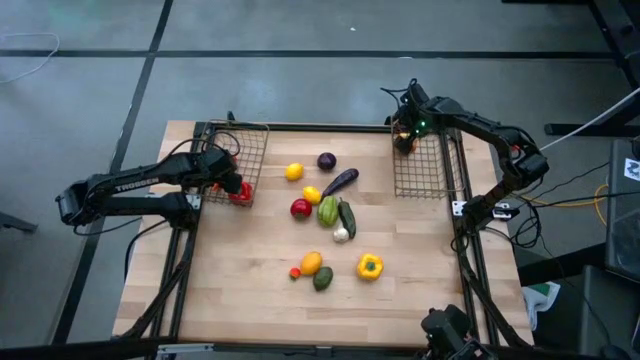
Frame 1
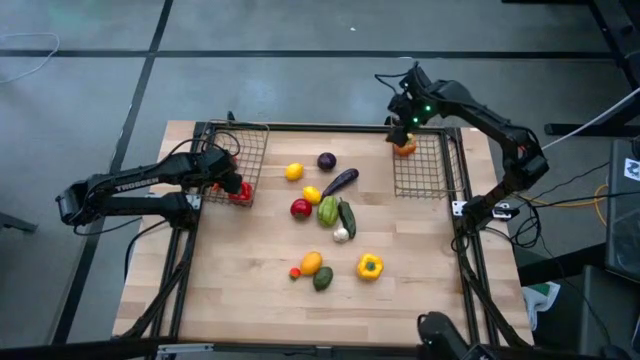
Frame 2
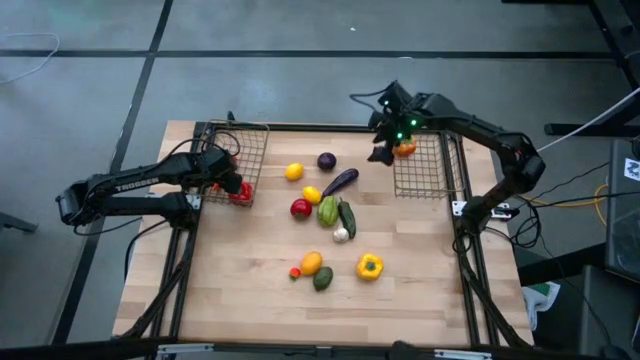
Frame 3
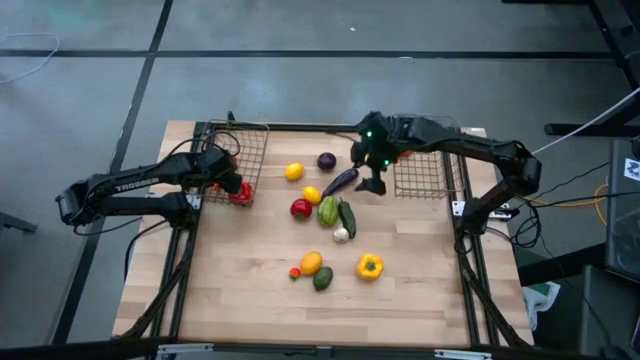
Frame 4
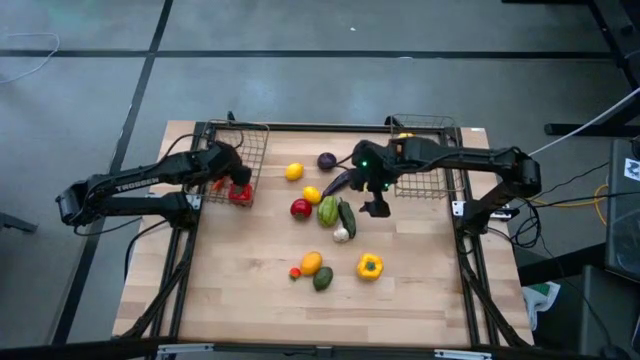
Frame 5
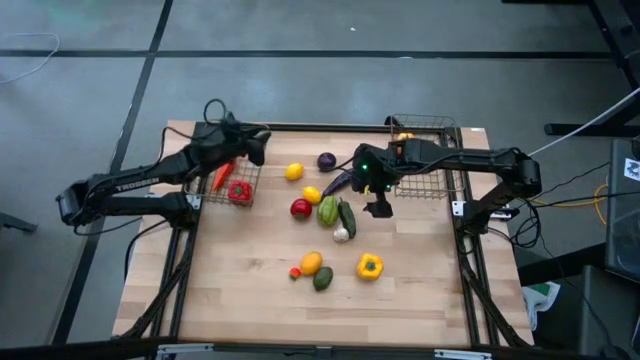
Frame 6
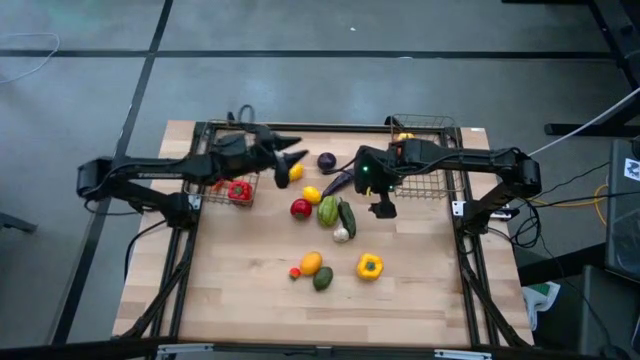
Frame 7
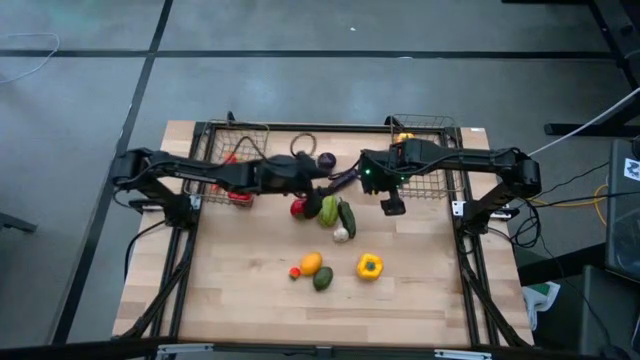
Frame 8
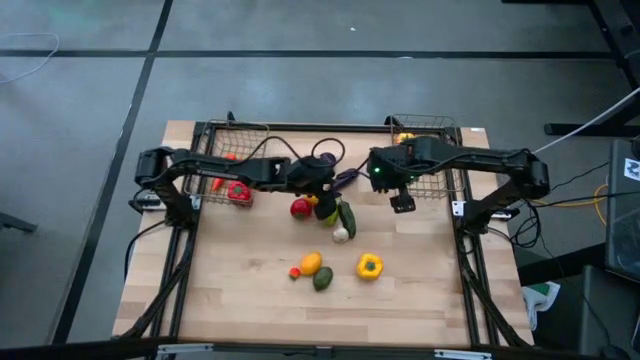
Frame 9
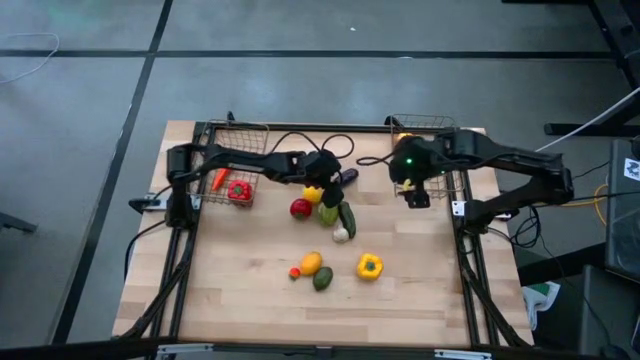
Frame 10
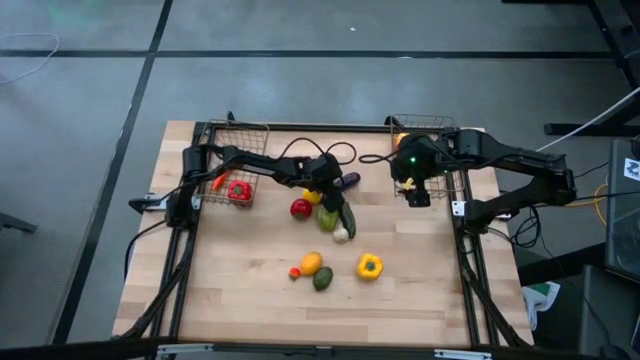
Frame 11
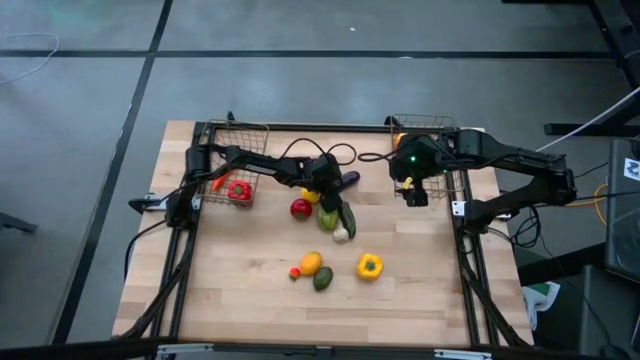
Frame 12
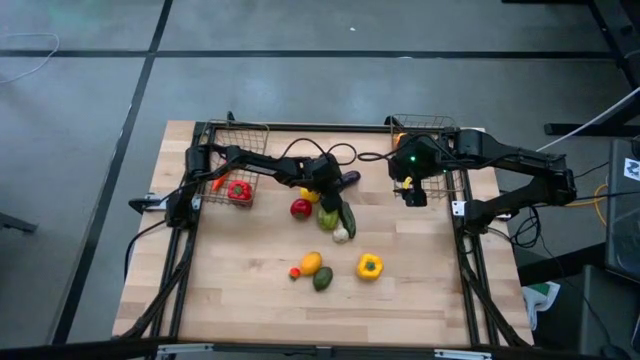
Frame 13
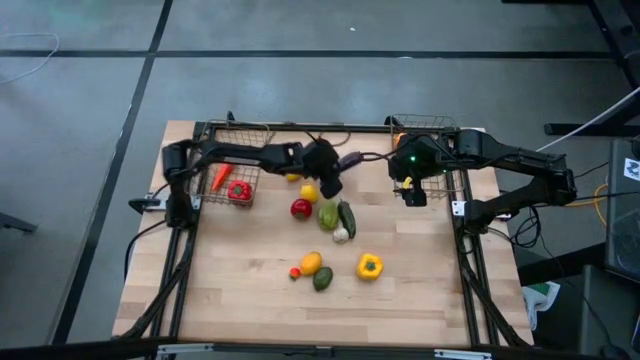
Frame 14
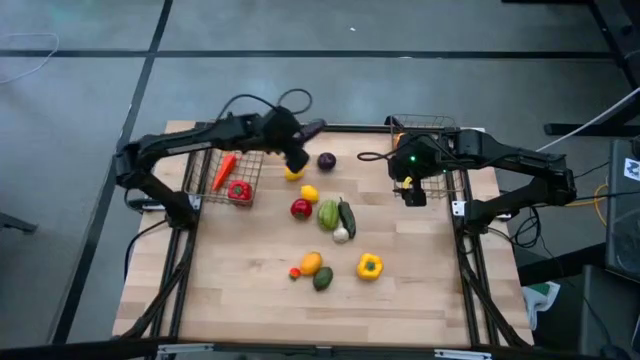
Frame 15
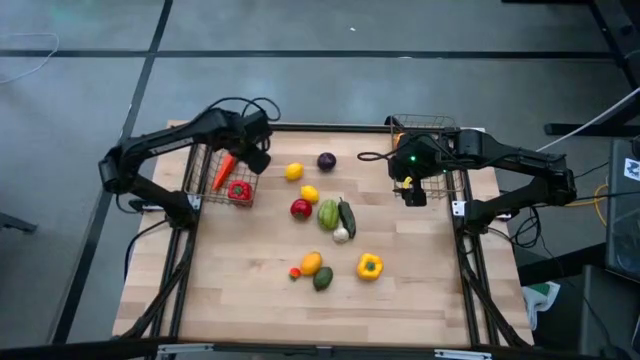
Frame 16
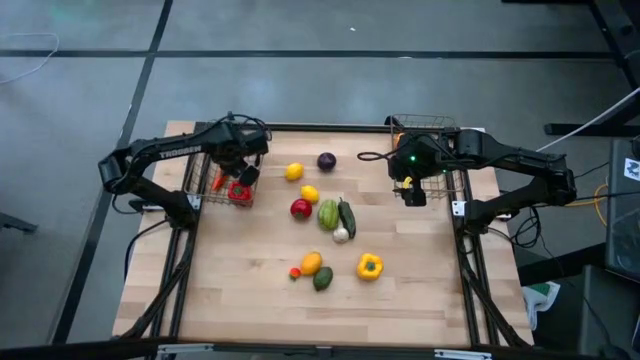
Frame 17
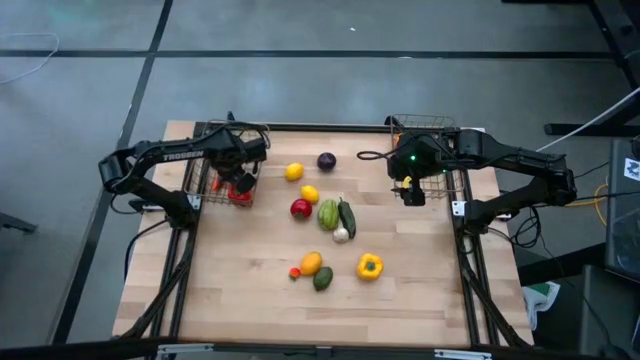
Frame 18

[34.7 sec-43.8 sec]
Task: Sort produce into baskets
Put the violet eggplant into the left gold wire basket

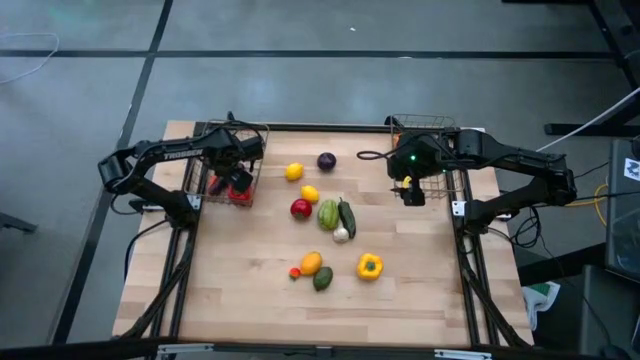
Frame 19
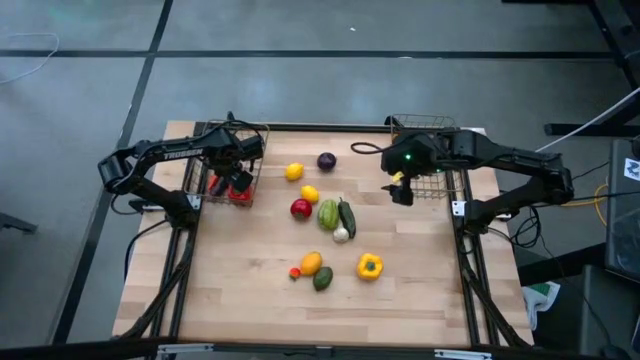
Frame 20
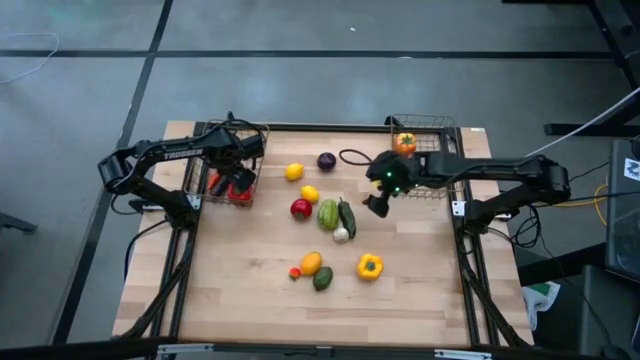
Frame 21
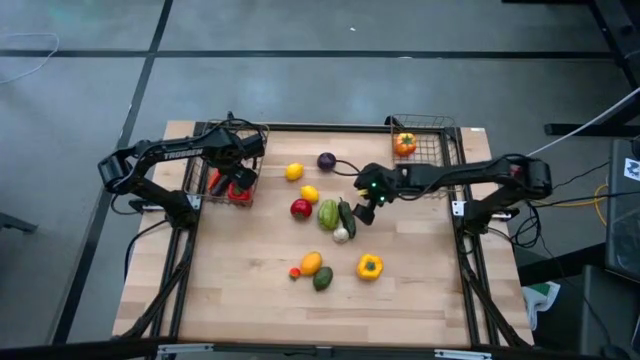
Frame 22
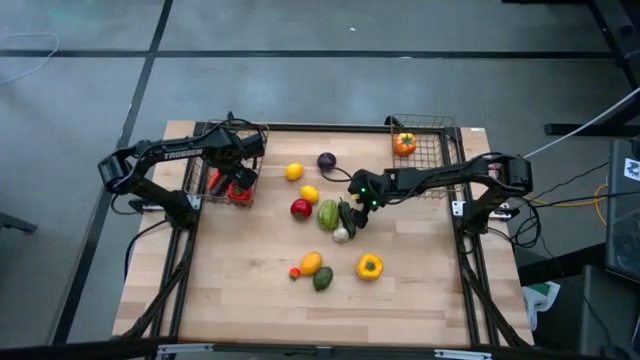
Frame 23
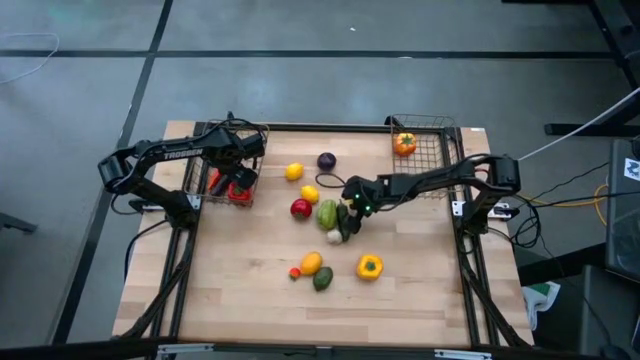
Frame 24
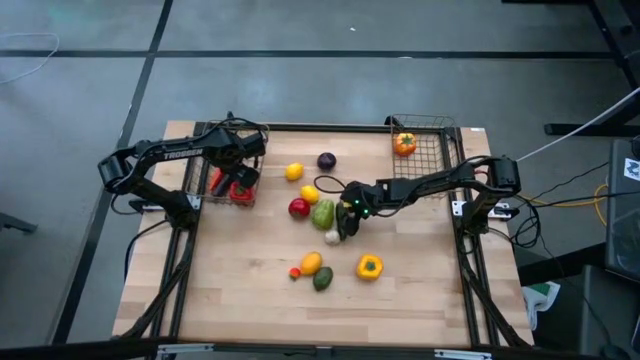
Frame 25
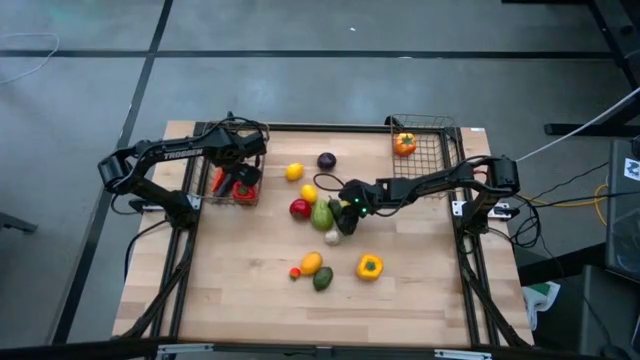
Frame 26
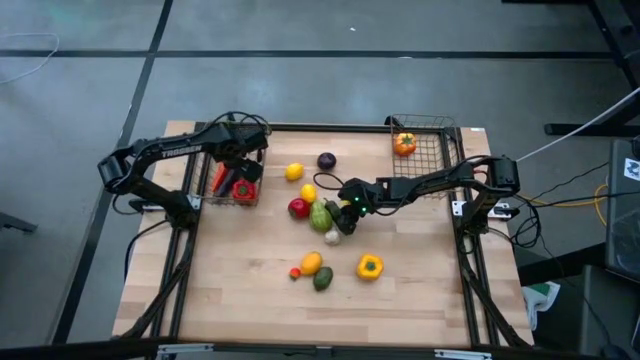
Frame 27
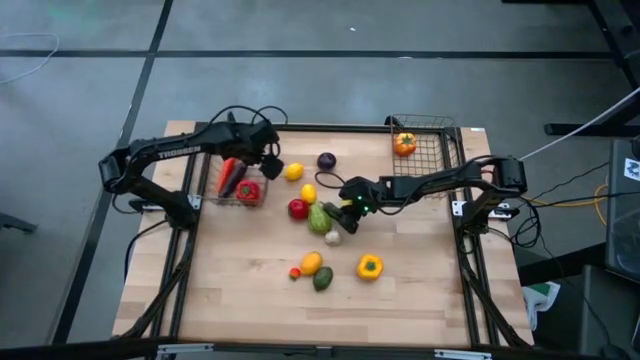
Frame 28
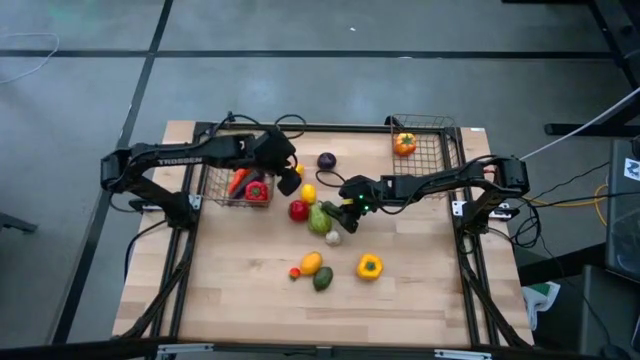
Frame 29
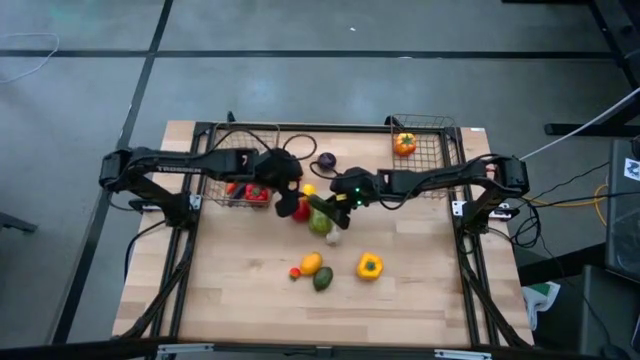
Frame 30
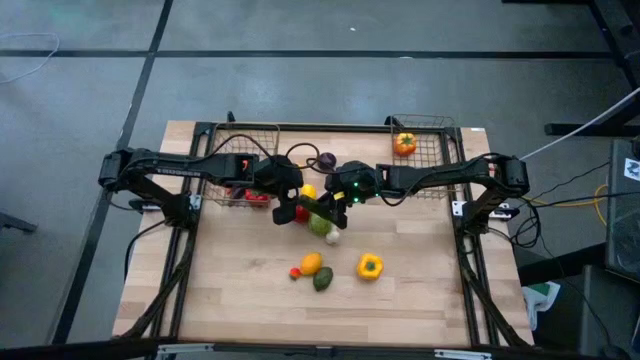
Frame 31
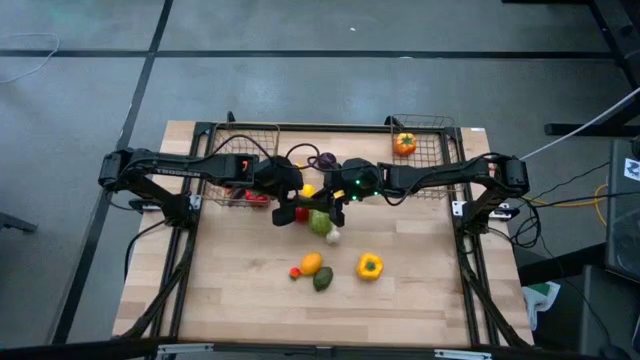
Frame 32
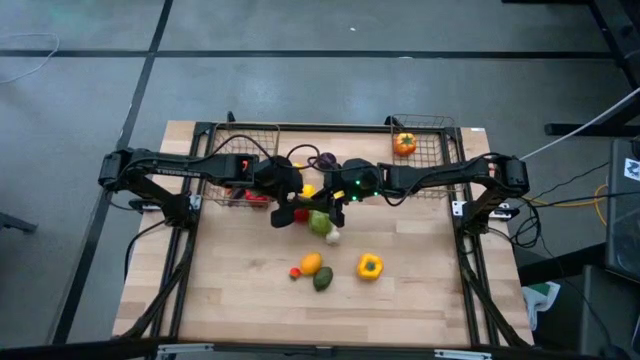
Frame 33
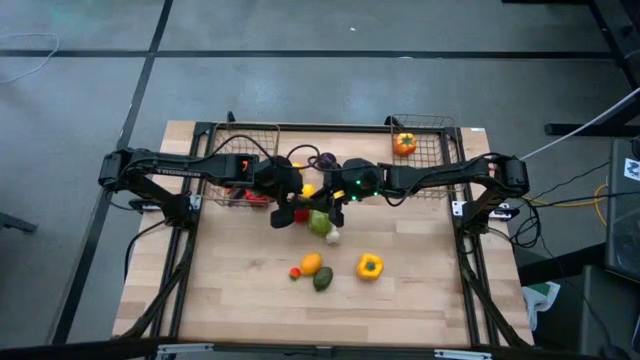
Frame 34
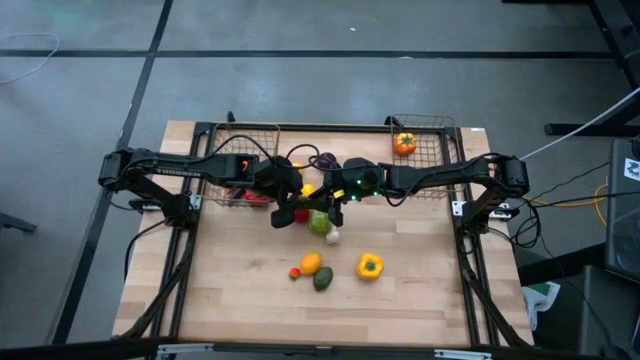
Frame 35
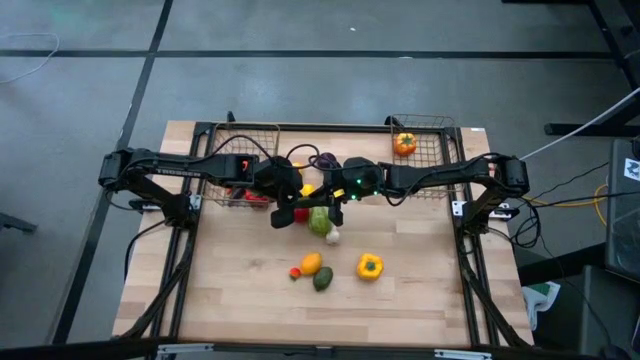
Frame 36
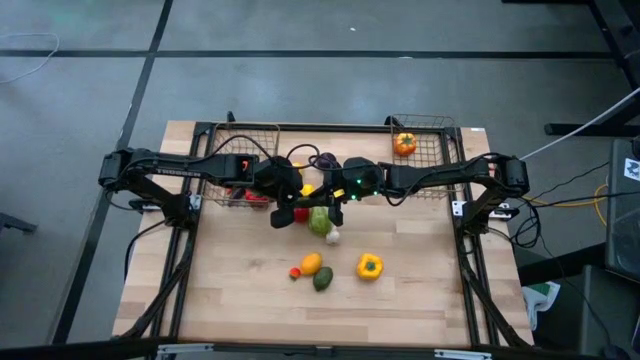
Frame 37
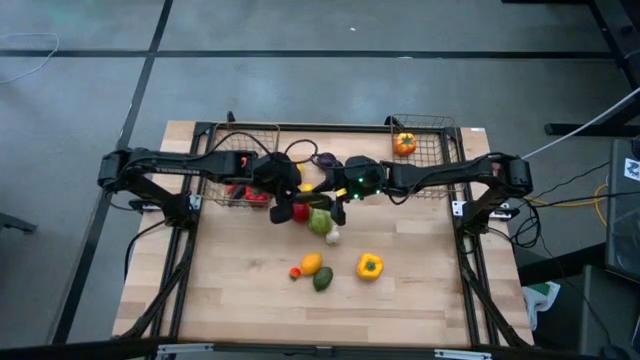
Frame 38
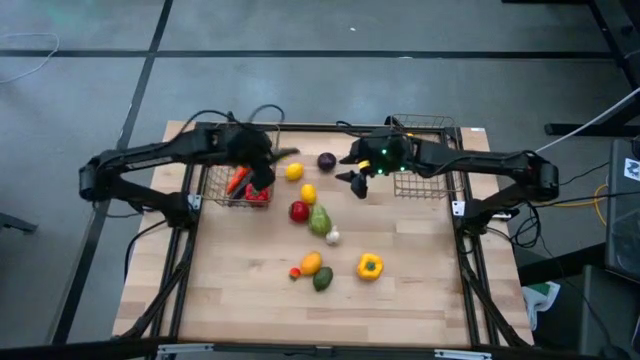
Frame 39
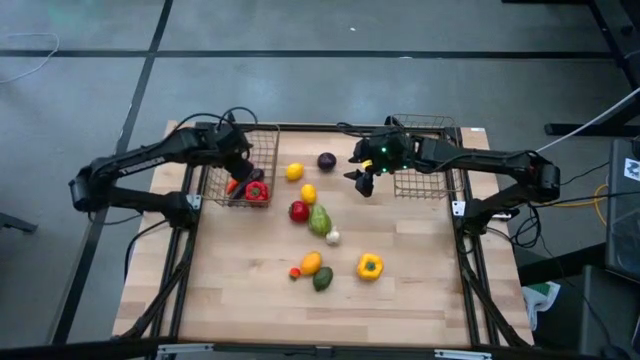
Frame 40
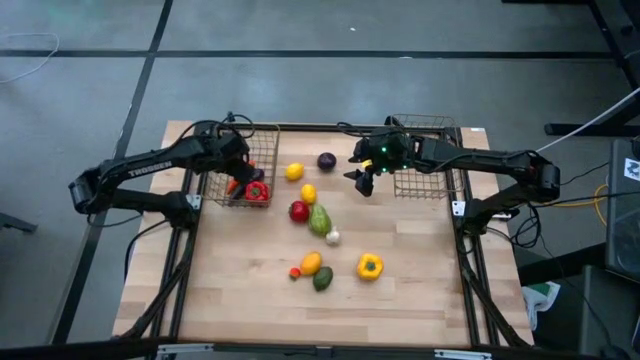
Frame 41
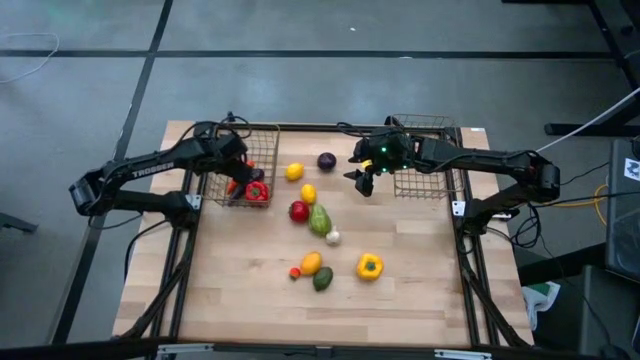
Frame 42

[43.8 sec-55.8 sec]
Put the green chili pepper into the left gold wire basket
